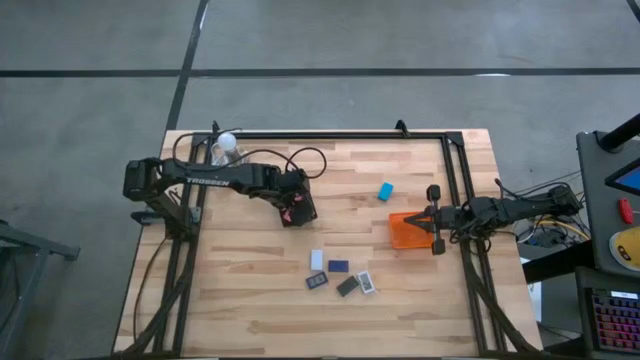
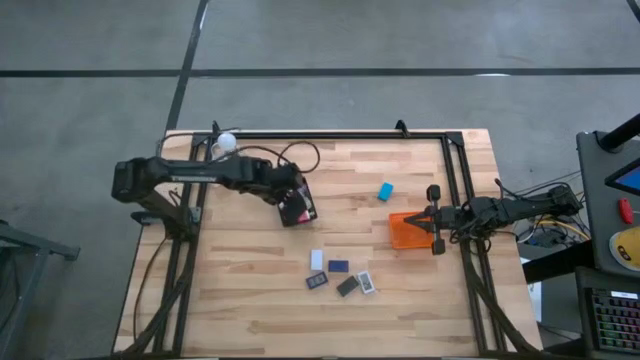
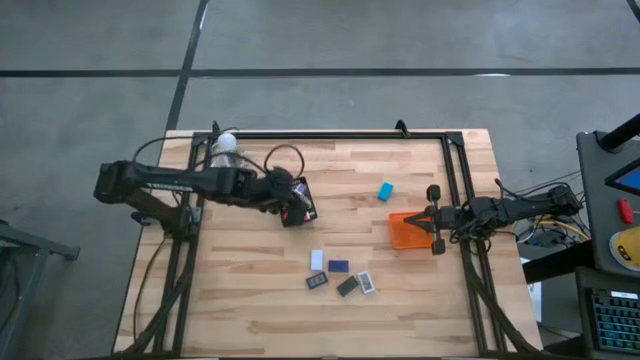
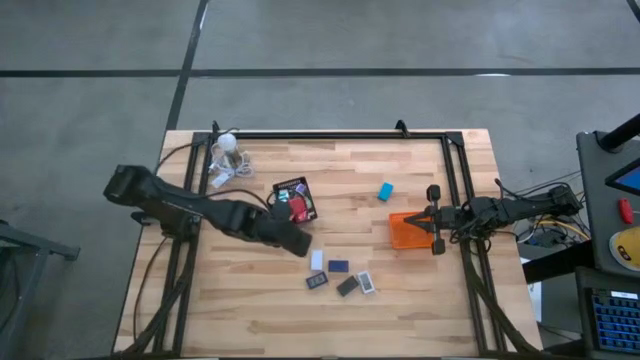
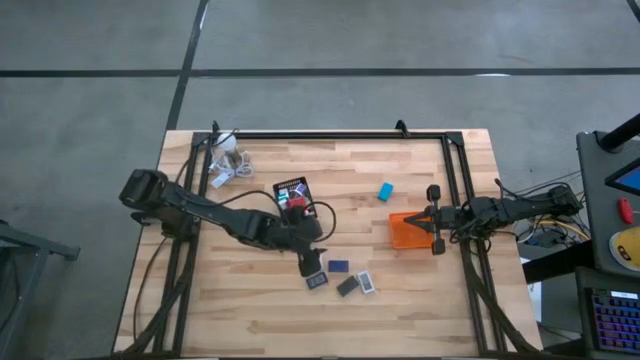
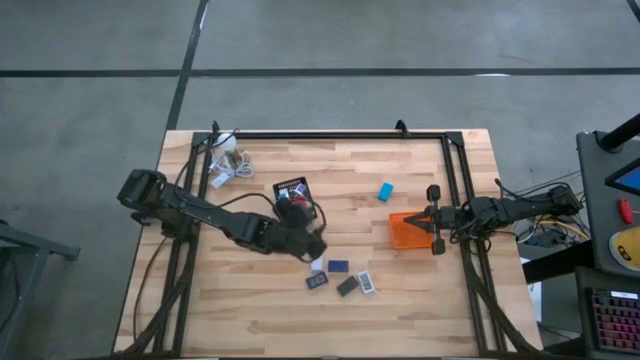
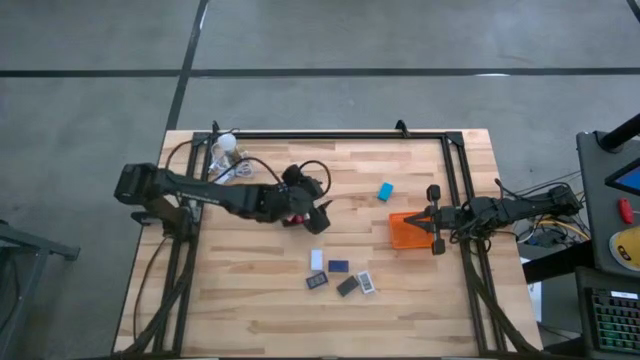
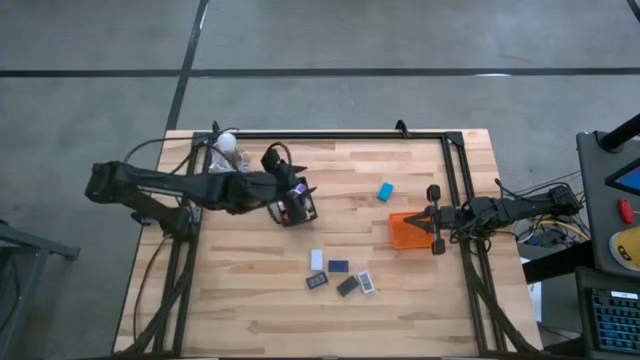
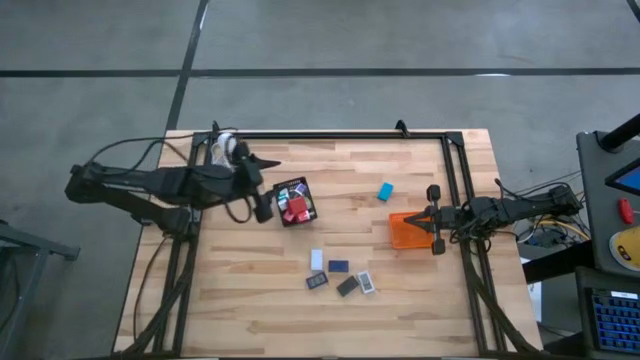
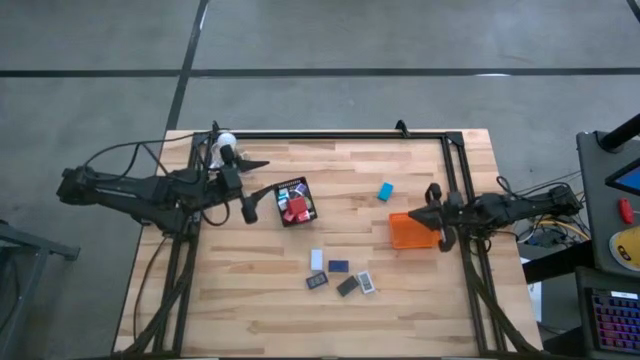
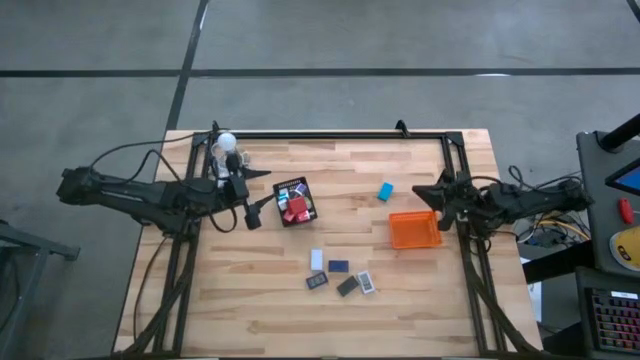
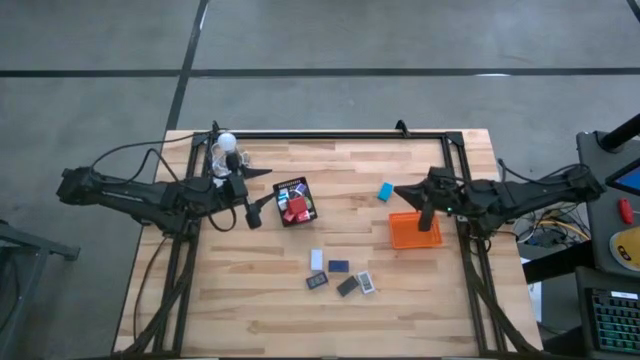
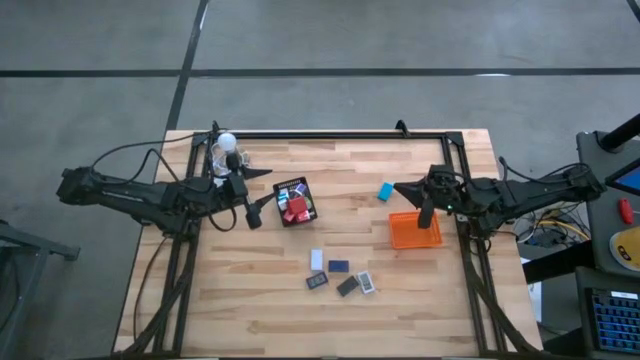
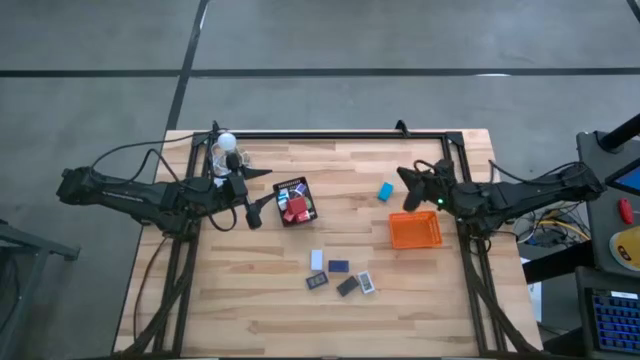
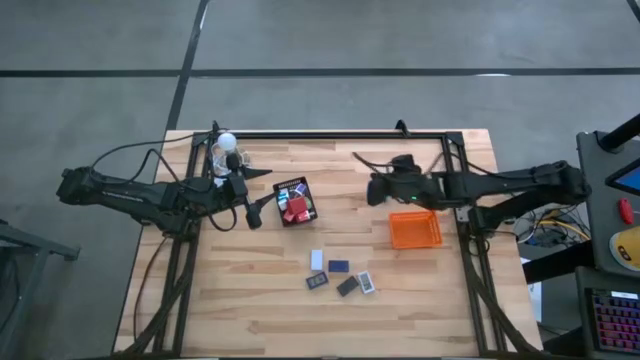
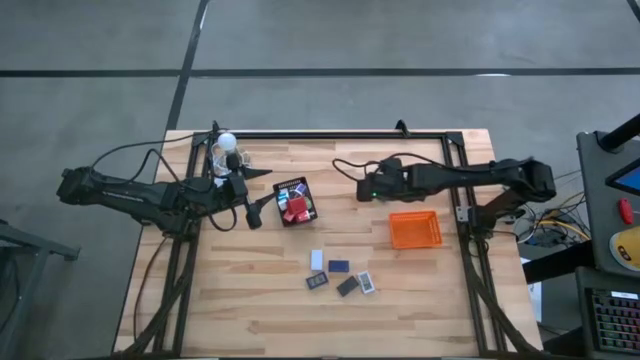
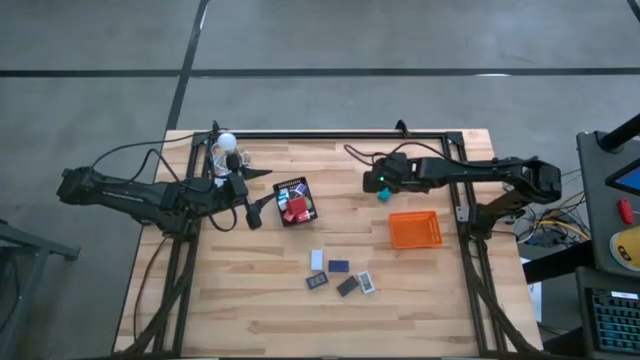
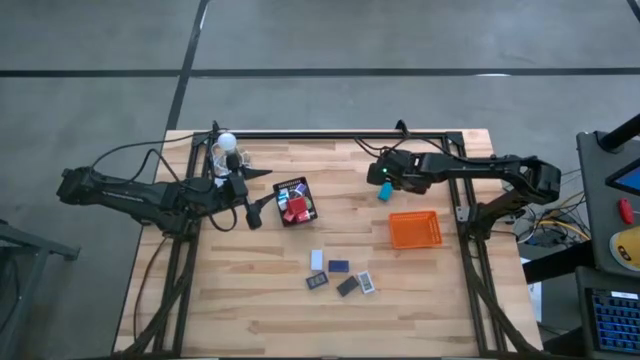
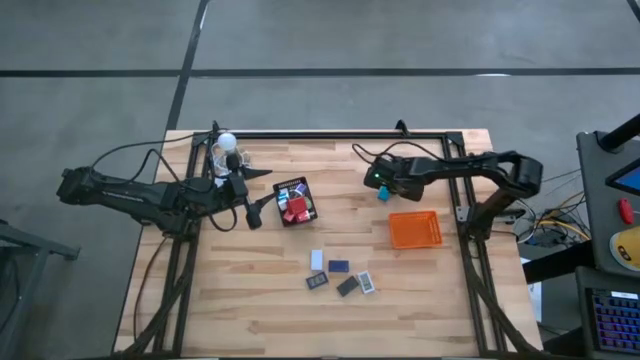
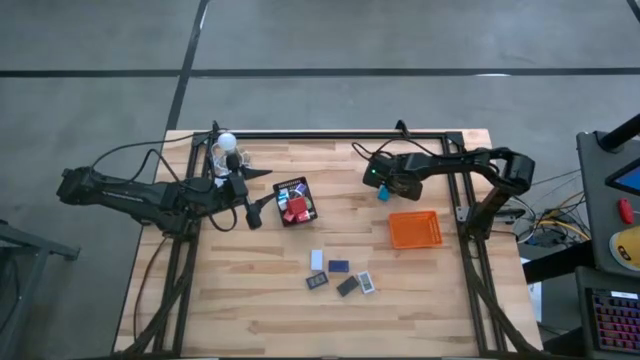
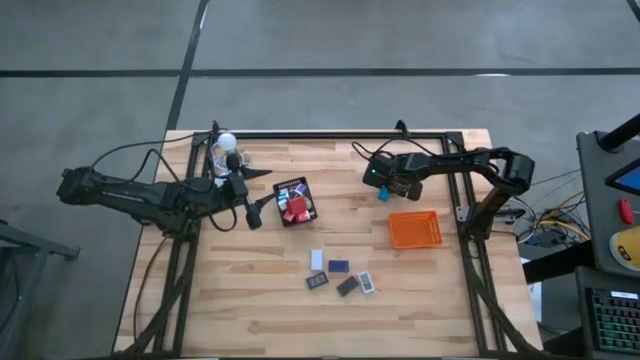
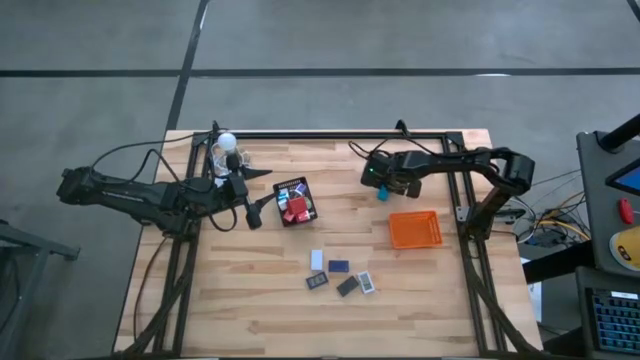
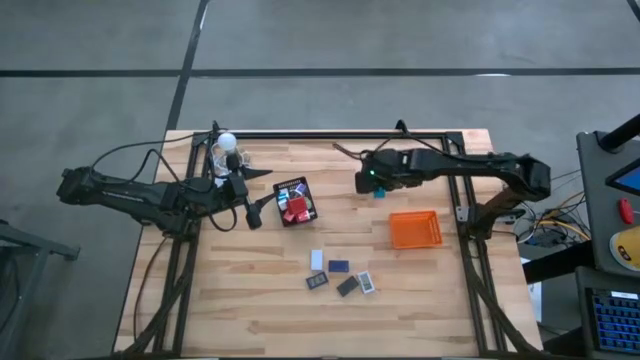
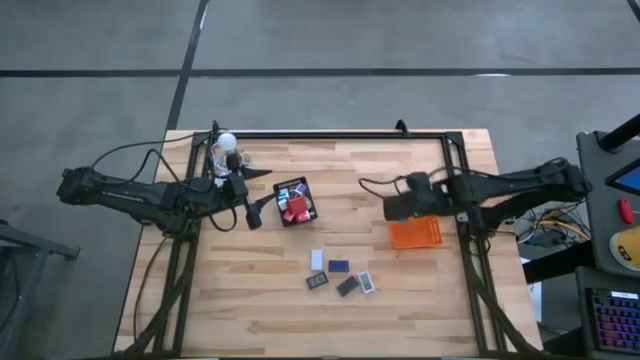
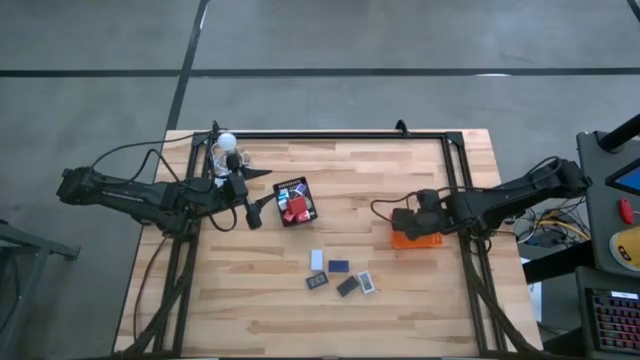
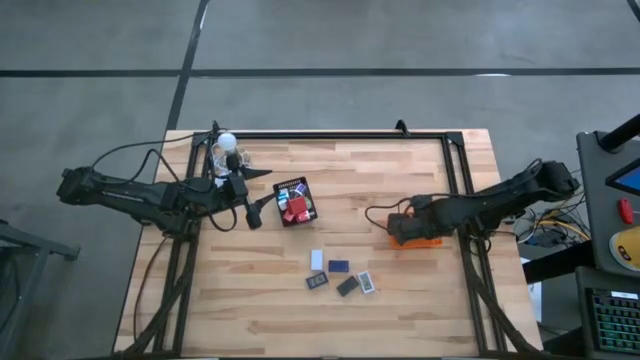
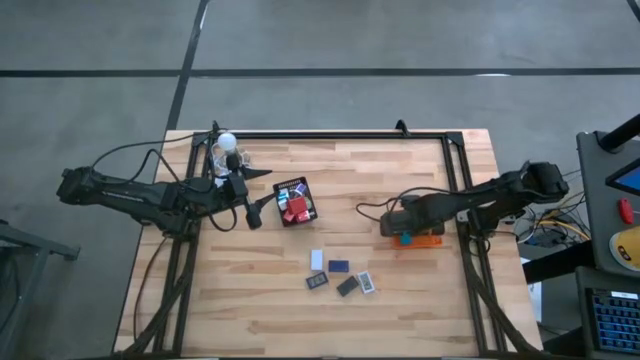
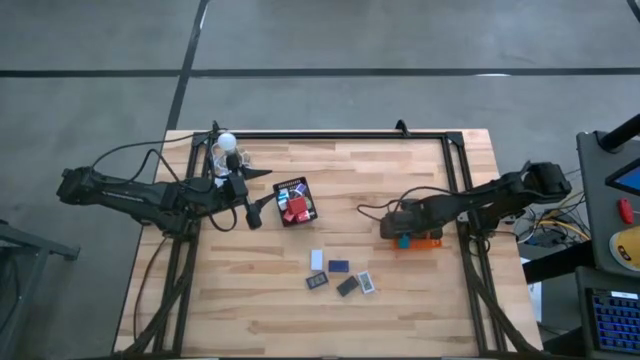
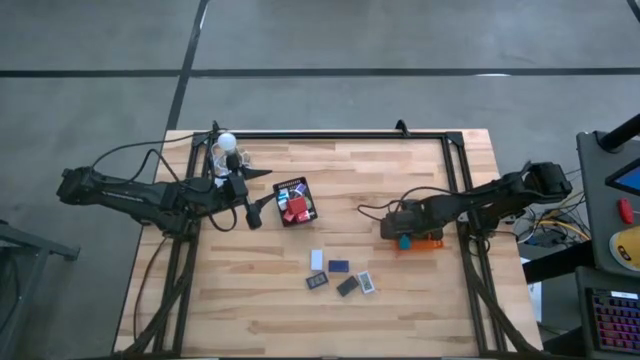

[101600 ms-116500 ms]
Task: Pick & Place Office items
Put the blue digital clock in the orange bin

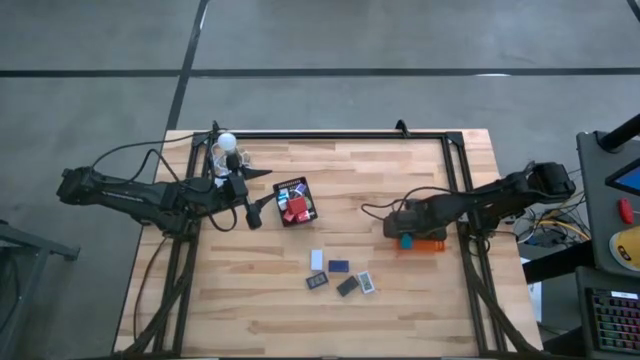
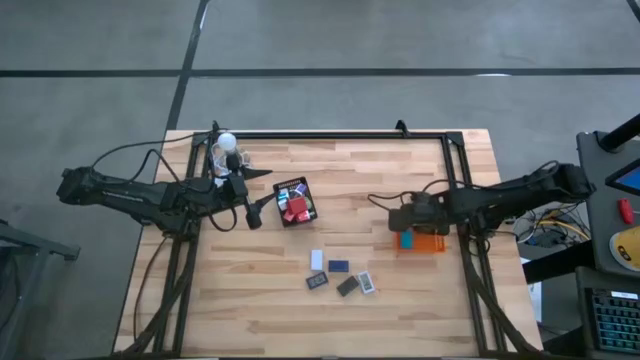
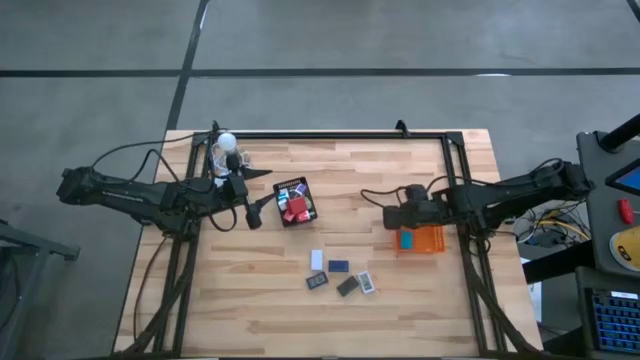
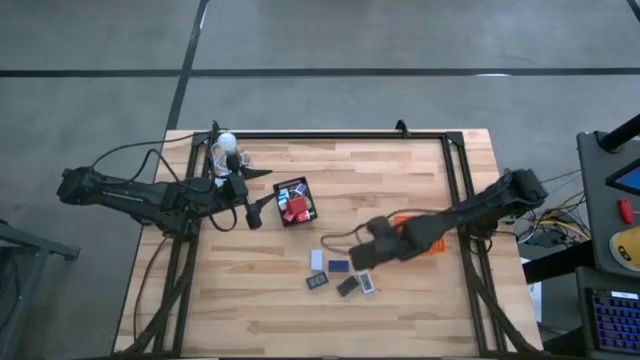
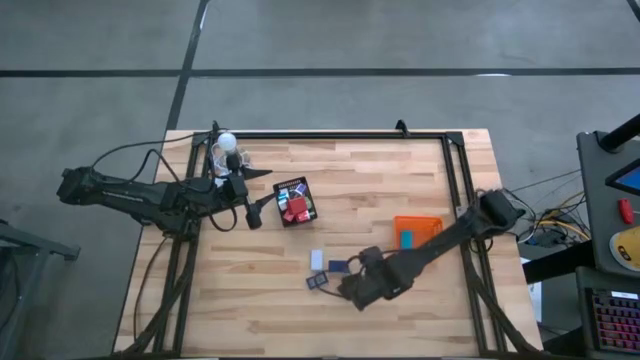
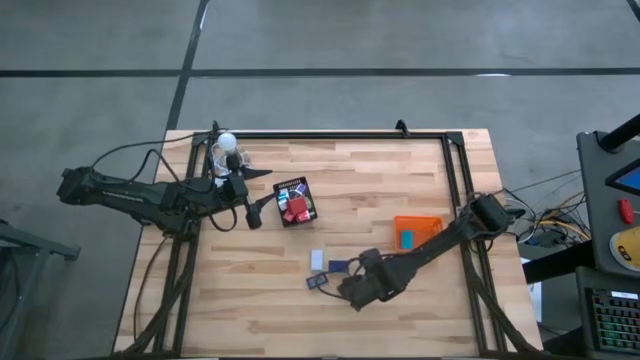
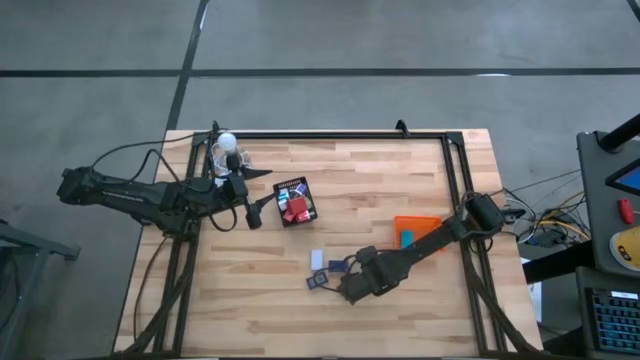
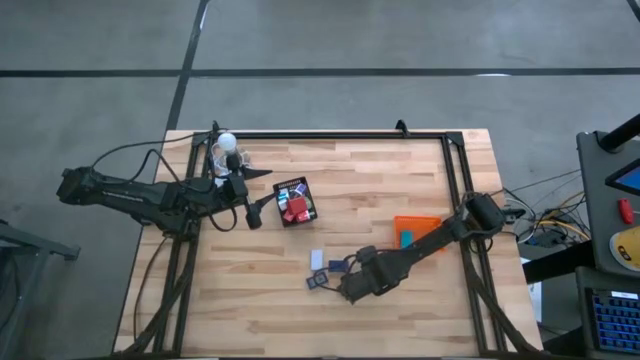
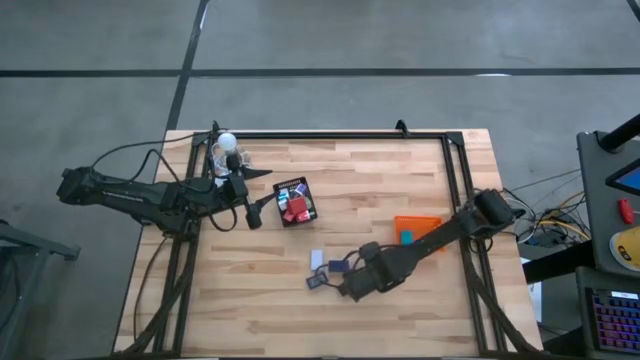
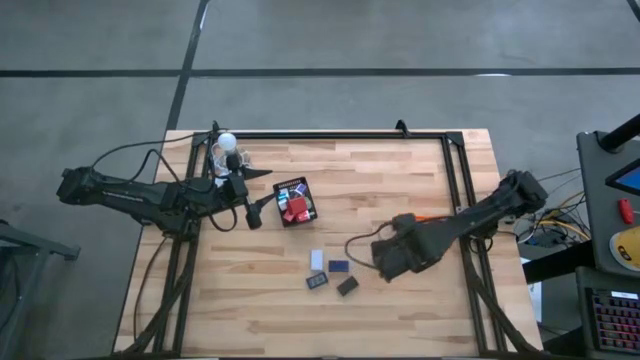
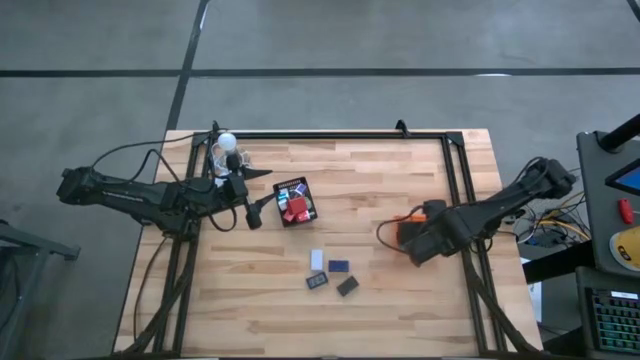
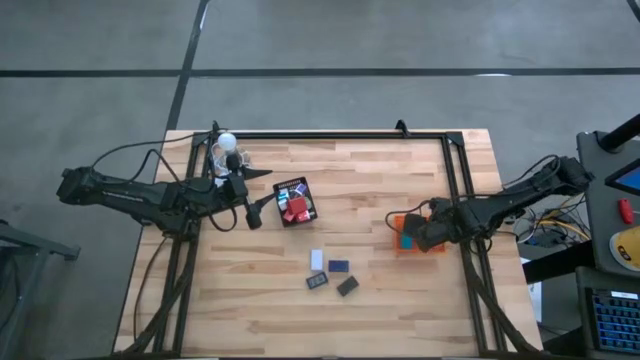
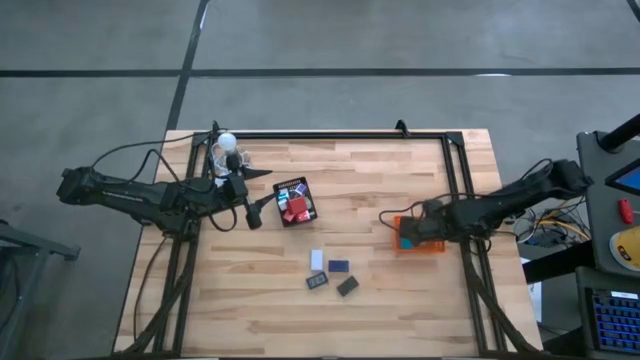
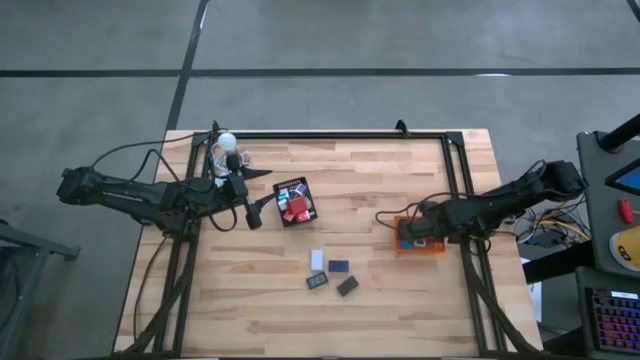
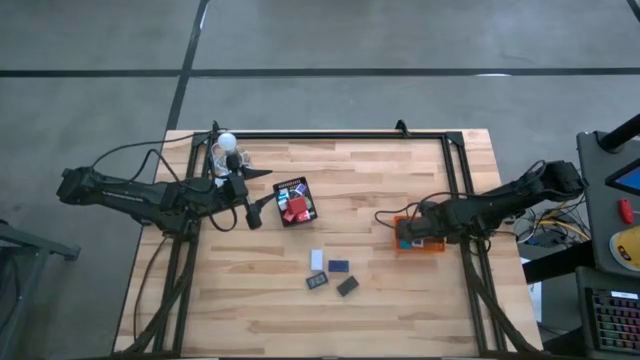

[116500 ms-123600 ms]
Put the right white digital clock in the orange bin
